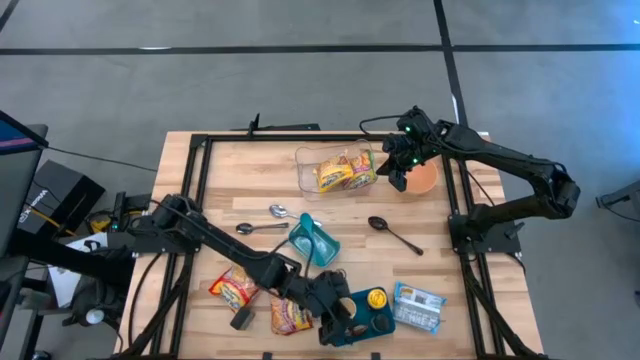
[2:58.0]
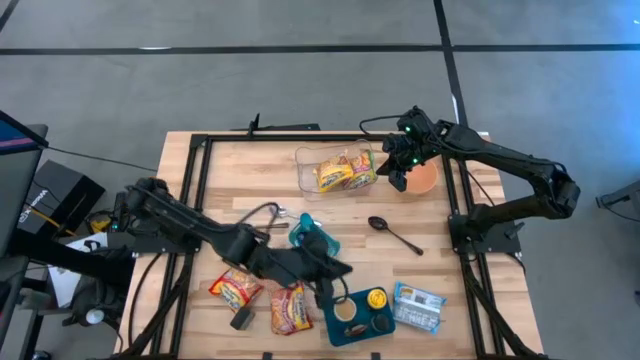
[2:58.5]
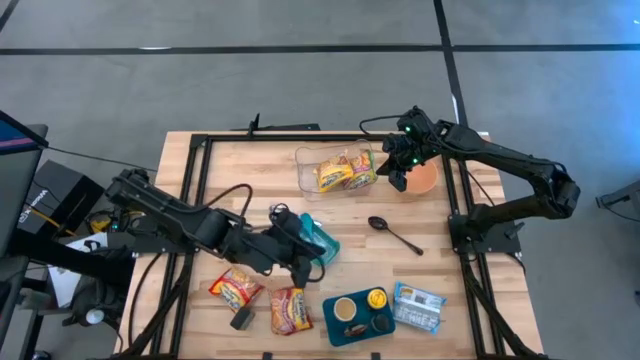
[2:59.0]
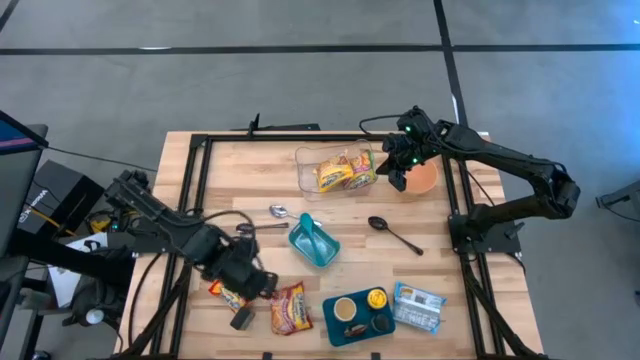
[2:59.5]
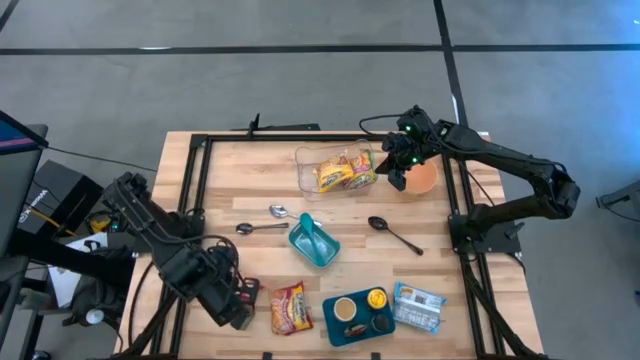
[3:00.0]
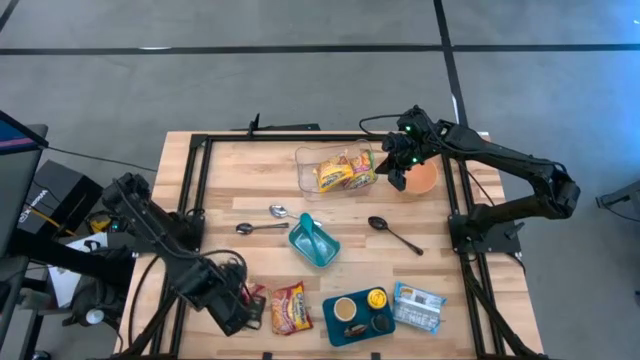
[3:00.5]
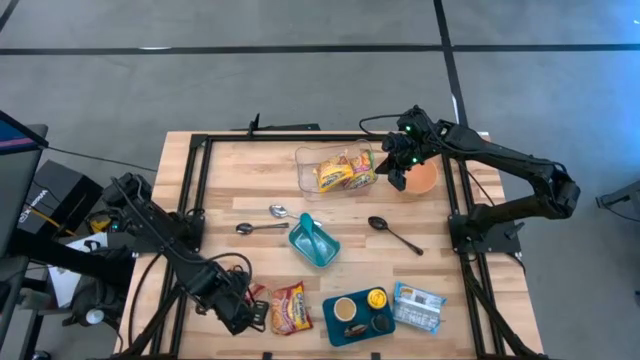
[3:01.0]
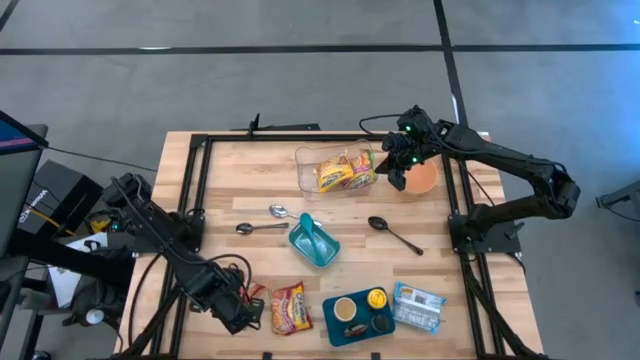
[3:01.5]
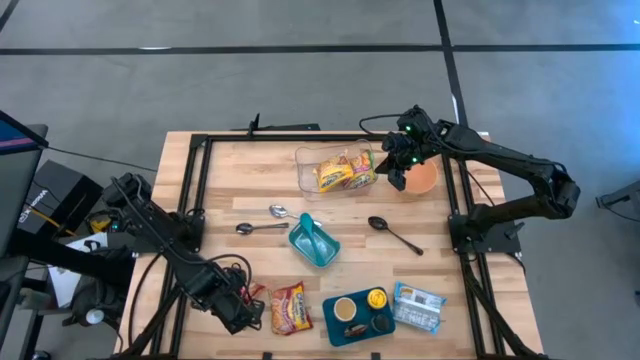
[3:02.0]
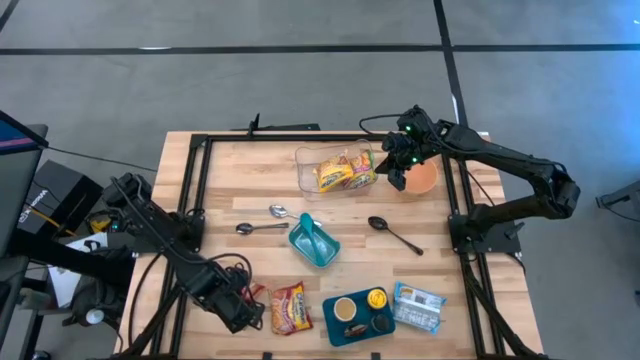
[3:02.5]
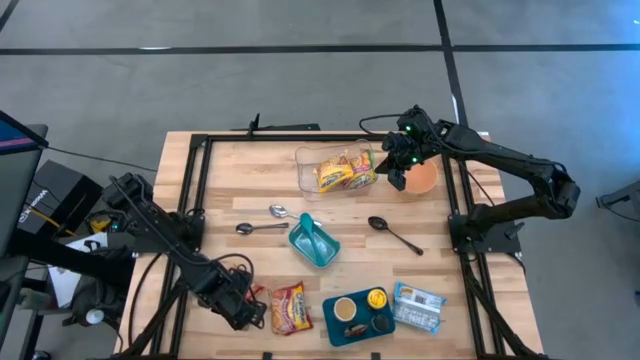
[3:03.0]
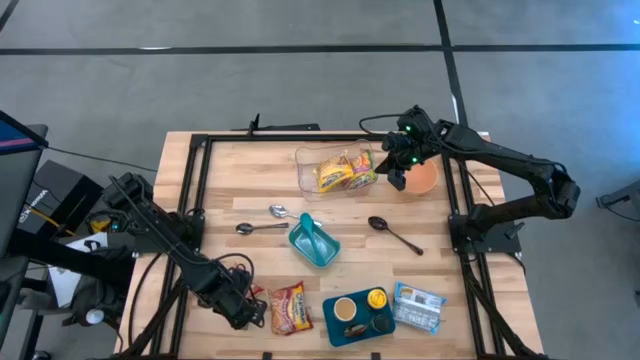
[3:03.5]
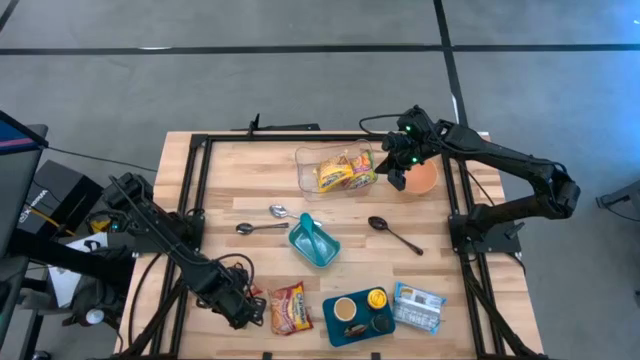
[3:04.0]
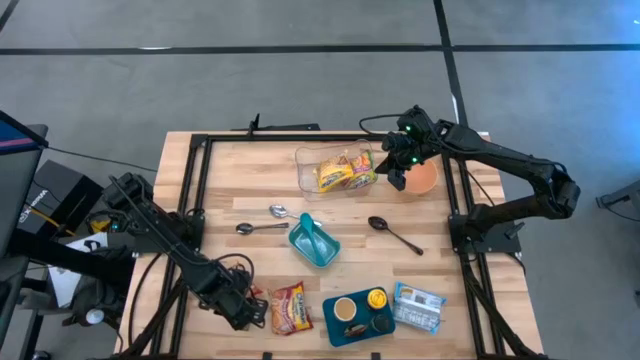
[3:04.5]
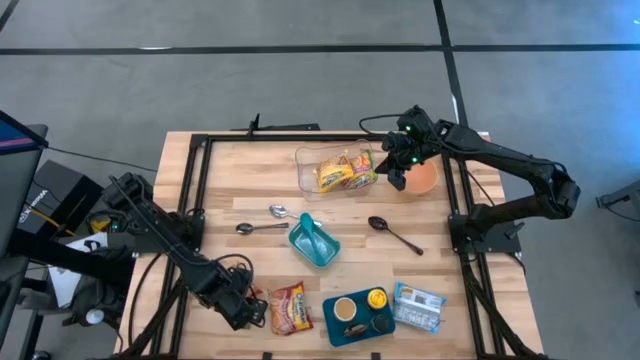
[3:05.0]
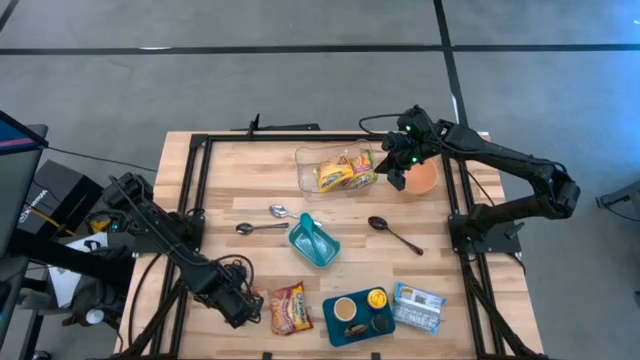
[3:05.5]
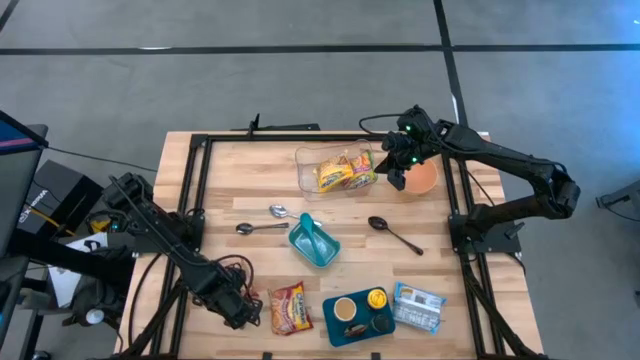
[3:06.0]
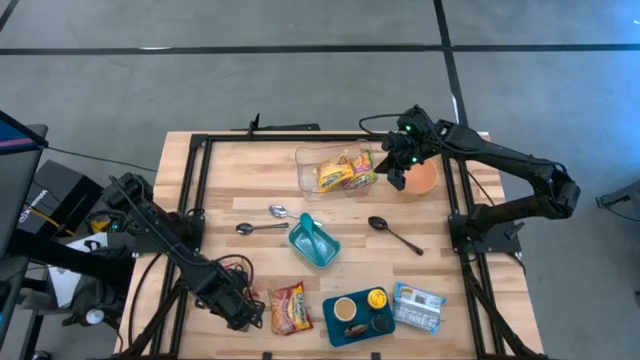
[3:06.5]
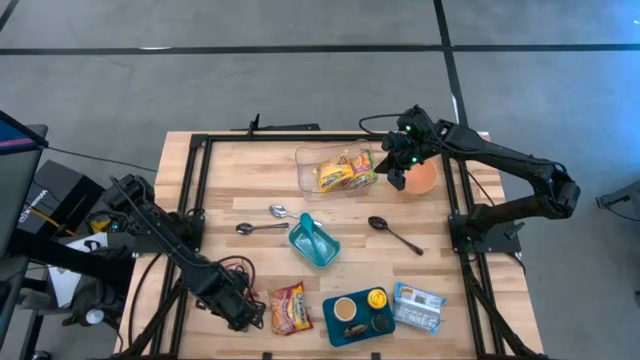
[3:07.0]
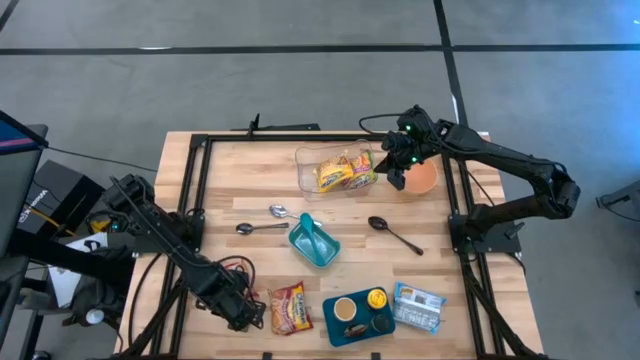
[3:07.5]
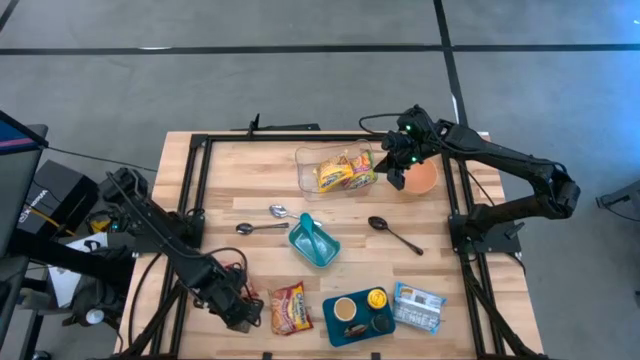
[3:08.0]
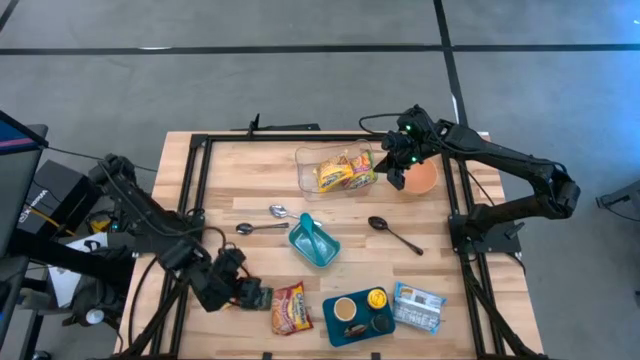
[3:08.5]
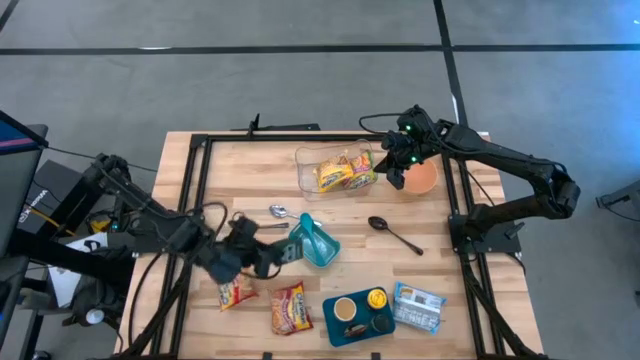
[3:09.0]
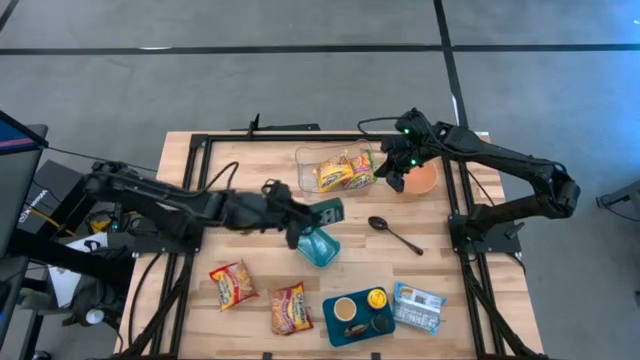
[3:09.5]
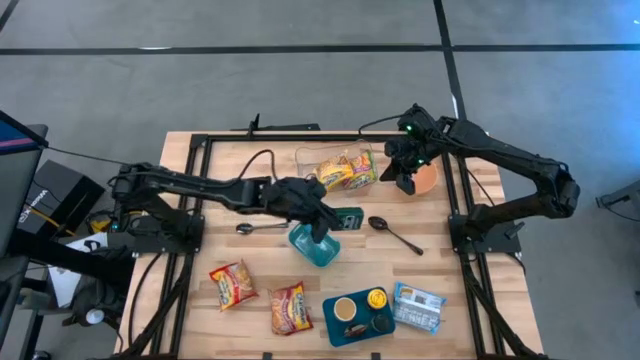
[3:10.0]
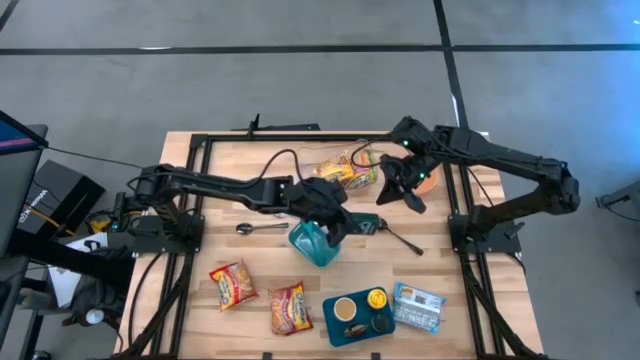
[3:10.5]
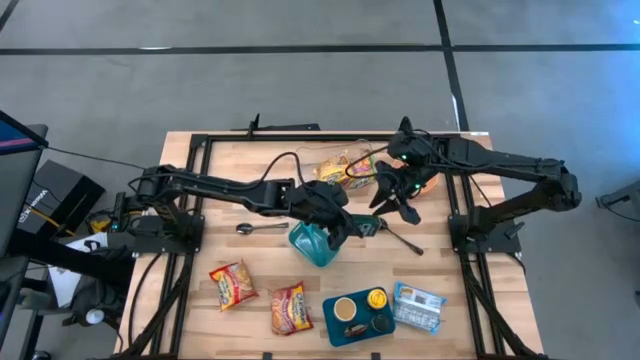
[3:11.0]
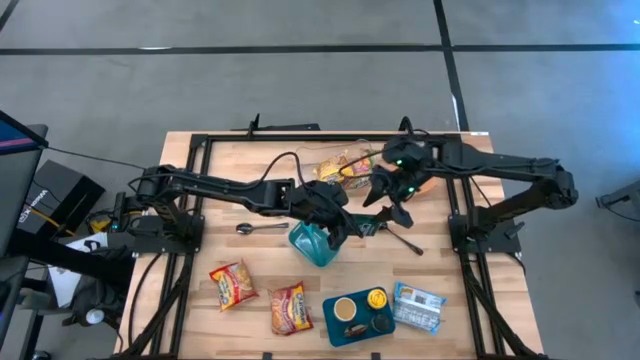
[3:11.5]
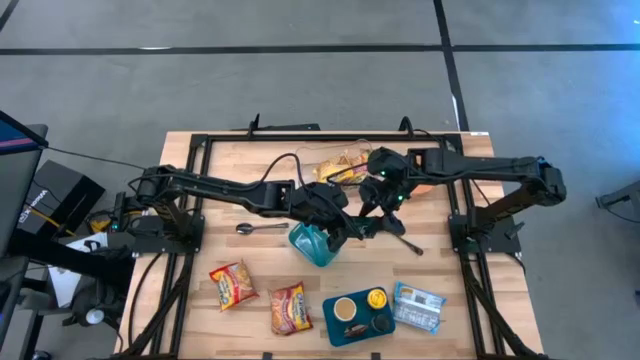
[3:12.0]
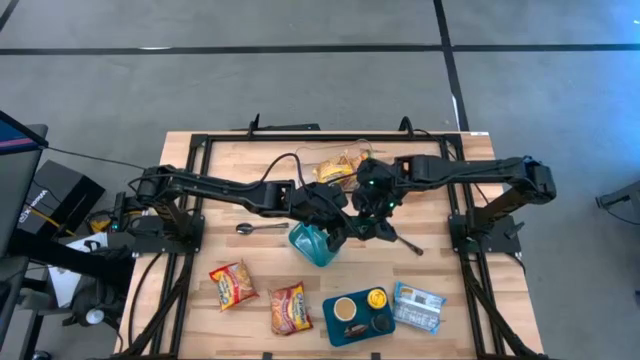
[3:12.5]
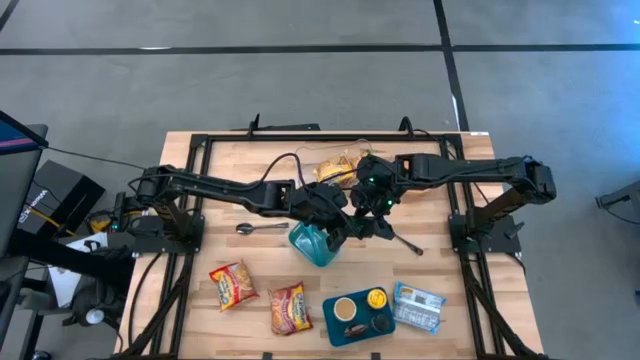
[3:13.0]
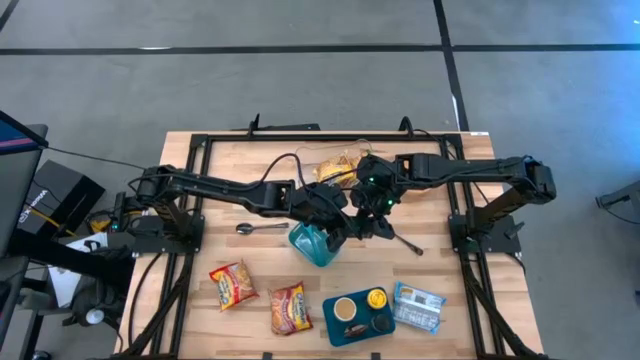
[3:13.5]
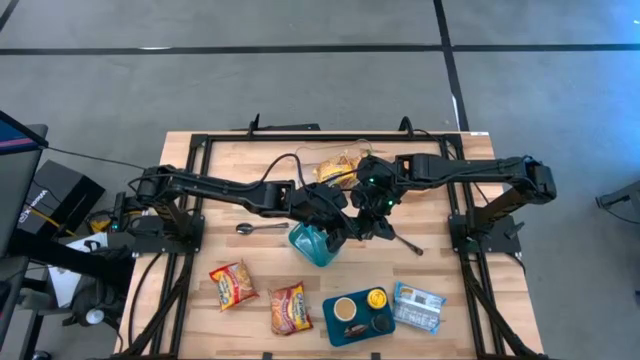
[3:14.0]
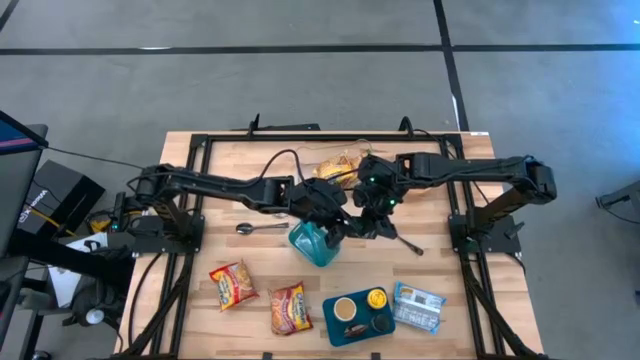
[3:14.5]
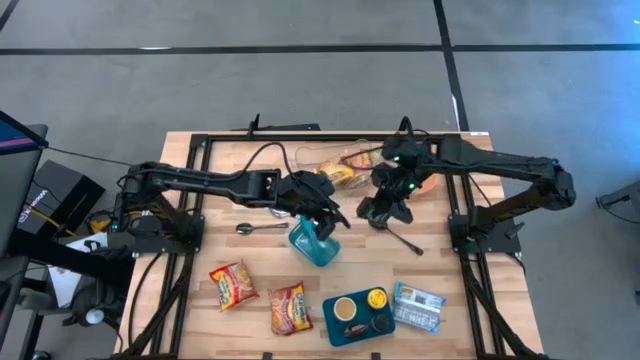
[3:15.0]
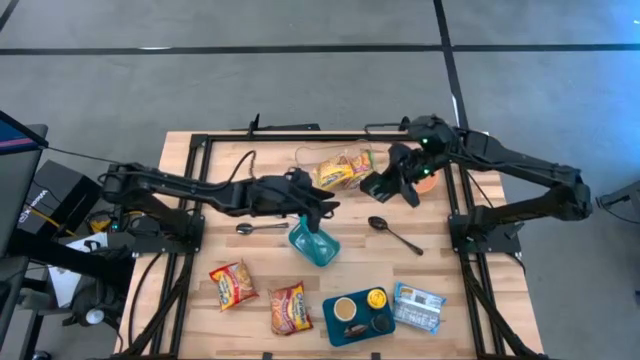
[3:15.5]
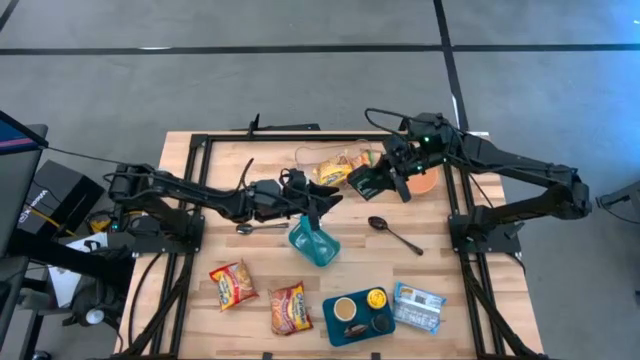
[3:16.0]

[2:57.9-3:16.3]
Task: Pick & Place Food Item
Put the black seasoning can into the blue bin

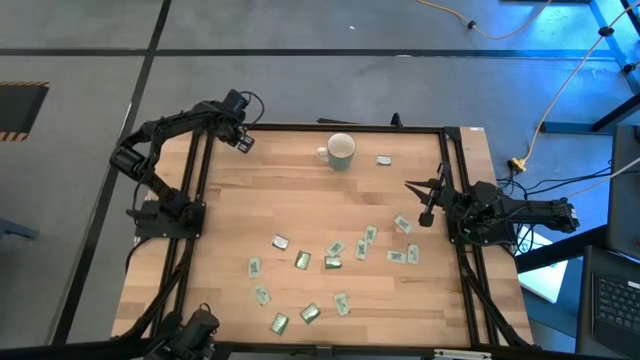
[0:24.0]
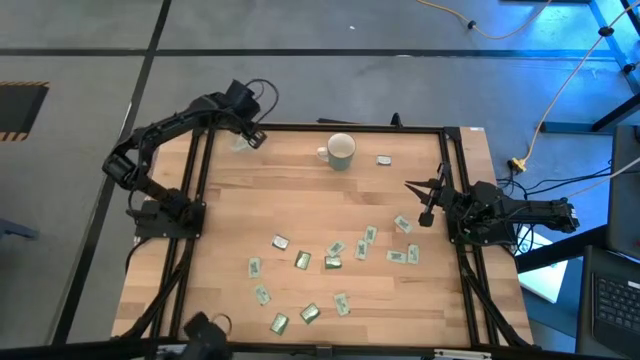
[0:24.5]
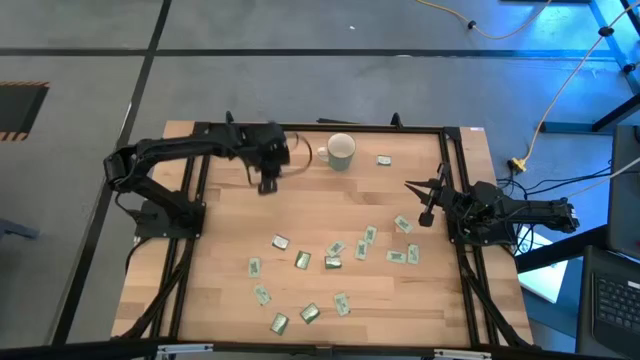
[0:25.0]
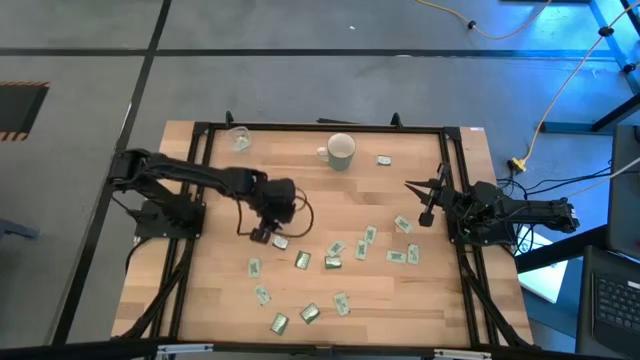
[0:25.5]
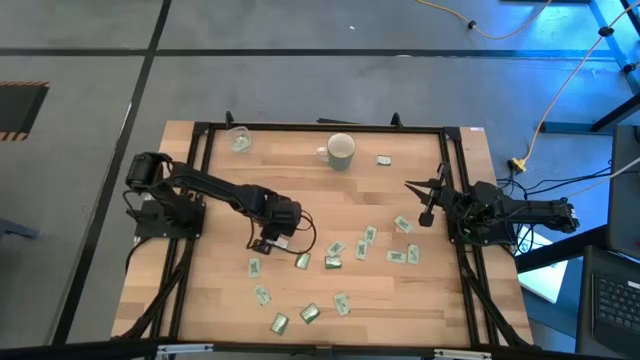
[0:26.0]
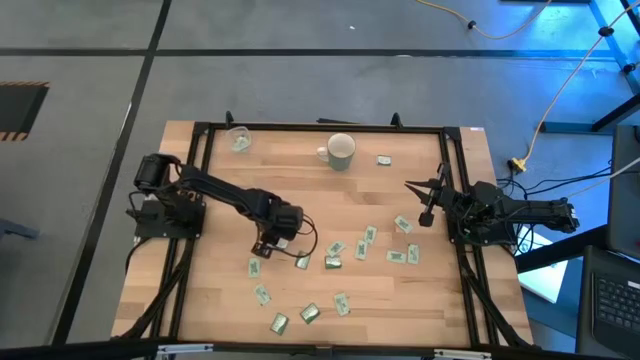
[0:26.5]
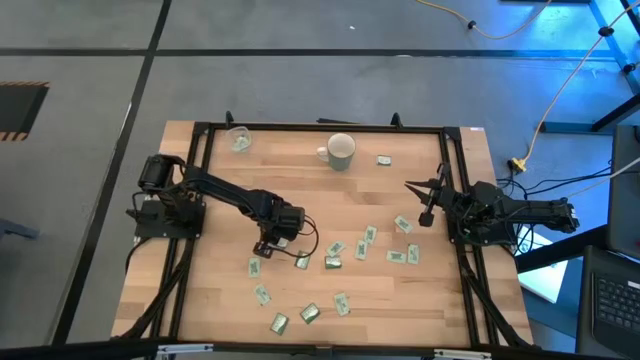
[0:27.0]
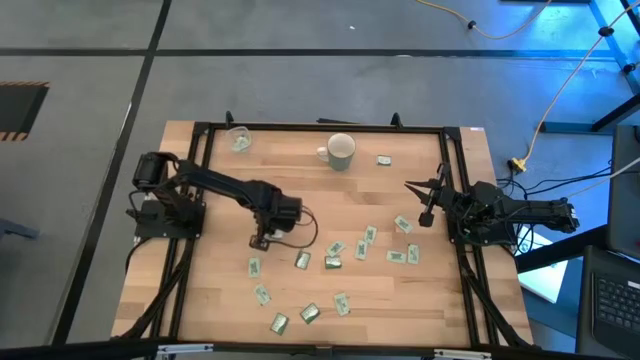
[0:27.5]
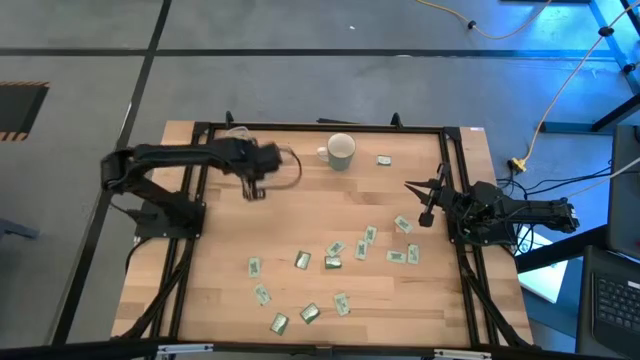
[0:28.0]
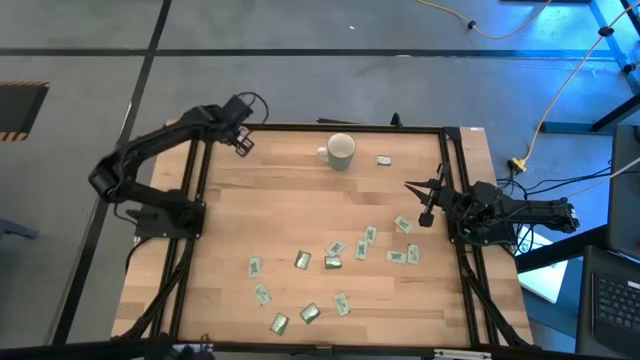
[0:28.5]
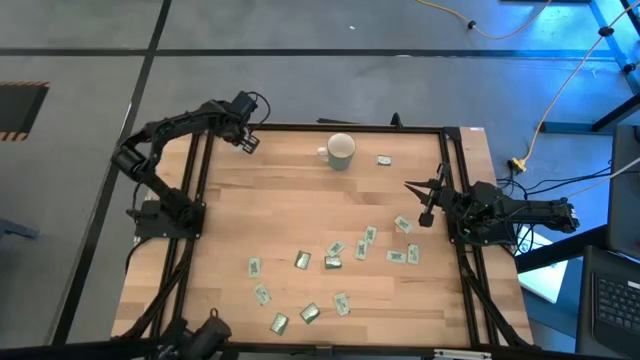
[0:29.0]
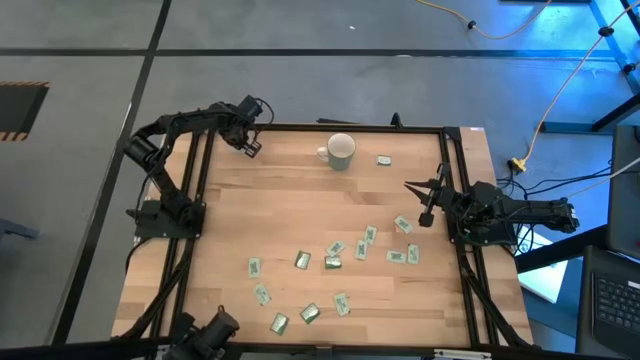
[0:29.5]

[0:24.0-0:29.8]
Task: Pick and place Stevia / Truvia into bins
Put the truvia packet into the transparent bin
